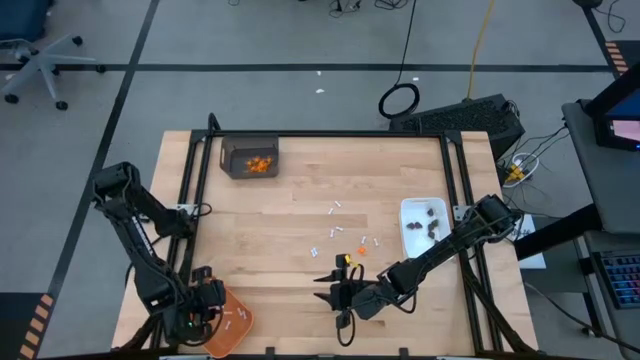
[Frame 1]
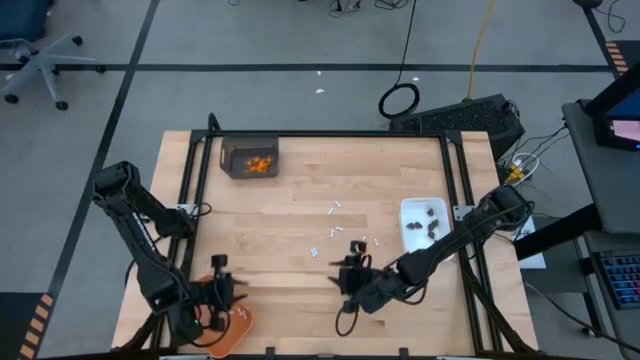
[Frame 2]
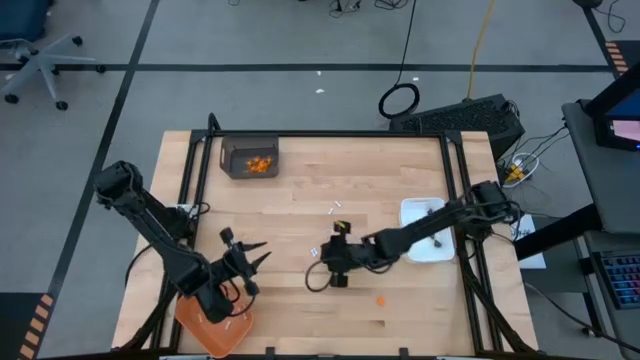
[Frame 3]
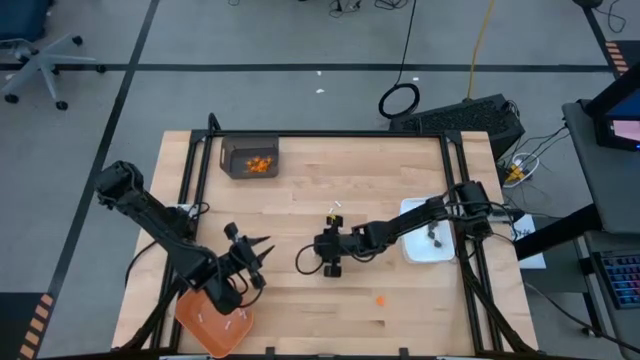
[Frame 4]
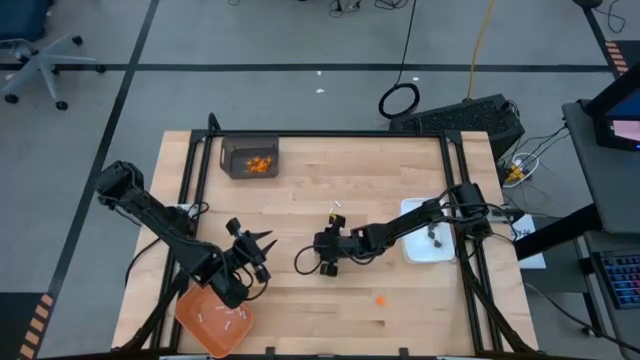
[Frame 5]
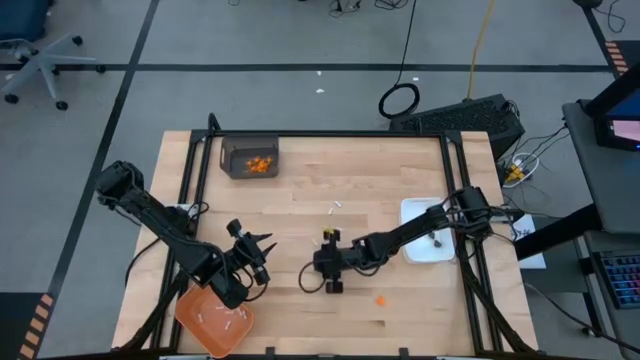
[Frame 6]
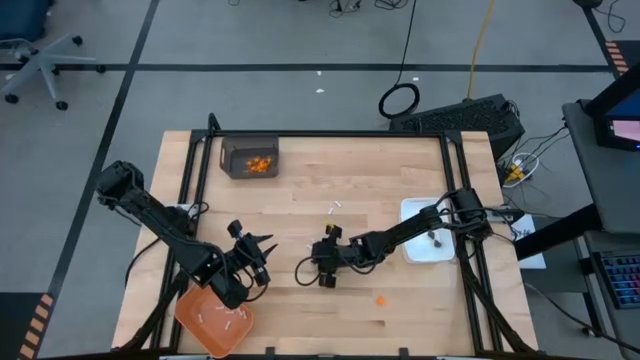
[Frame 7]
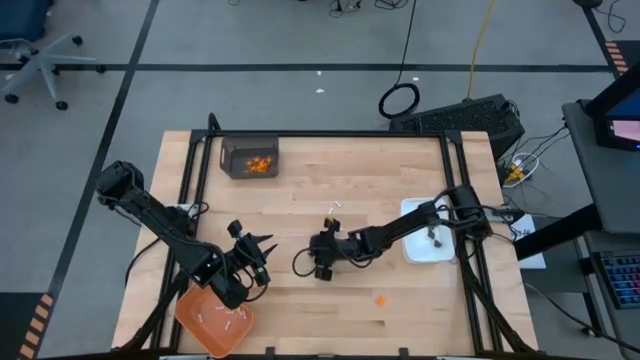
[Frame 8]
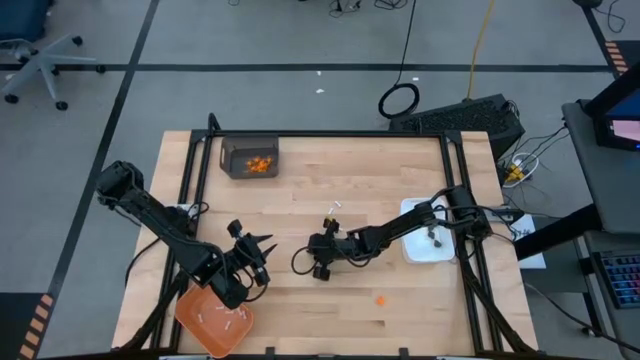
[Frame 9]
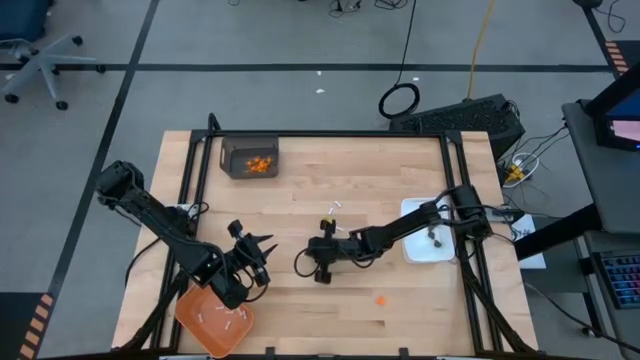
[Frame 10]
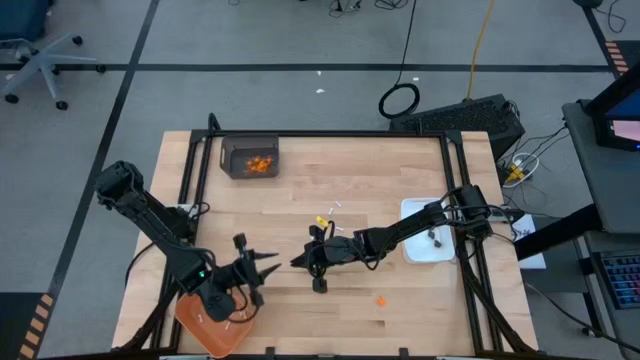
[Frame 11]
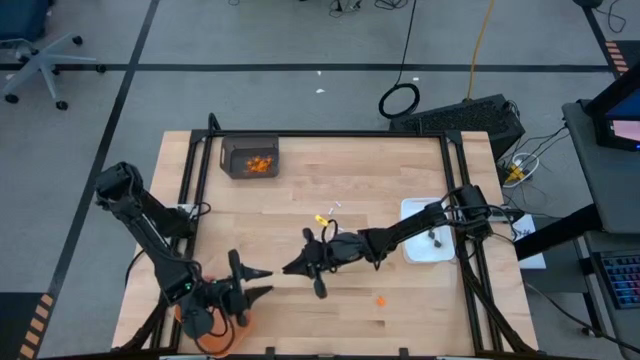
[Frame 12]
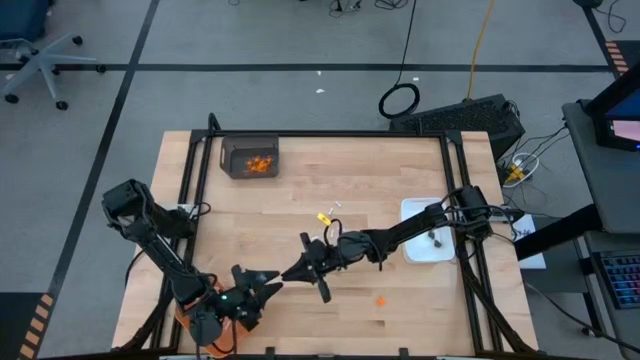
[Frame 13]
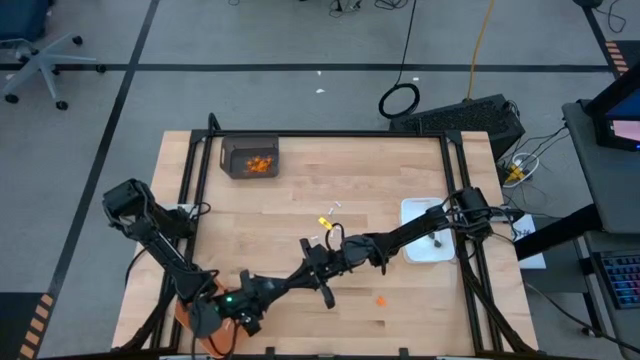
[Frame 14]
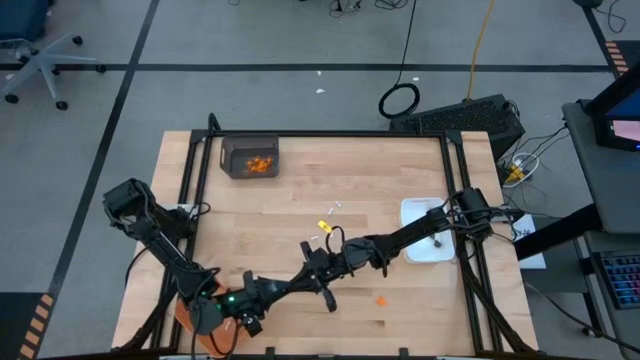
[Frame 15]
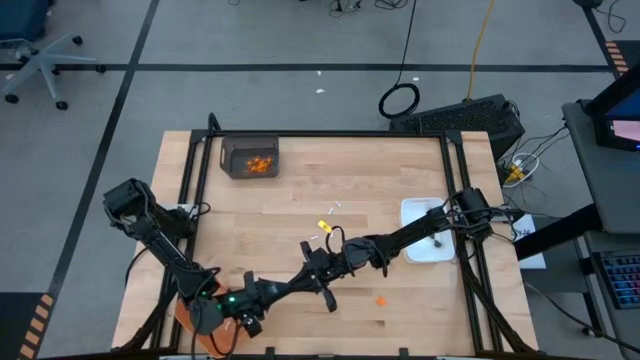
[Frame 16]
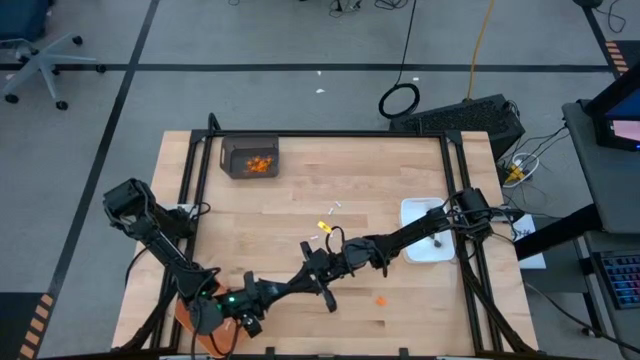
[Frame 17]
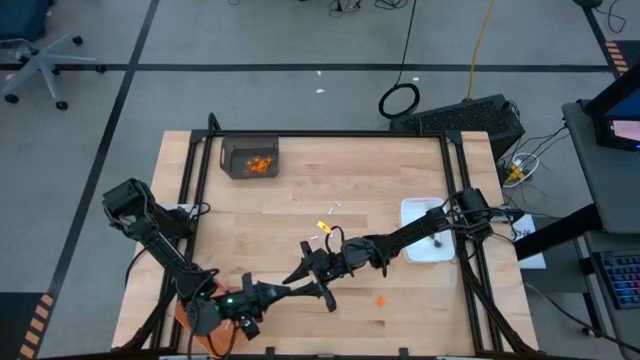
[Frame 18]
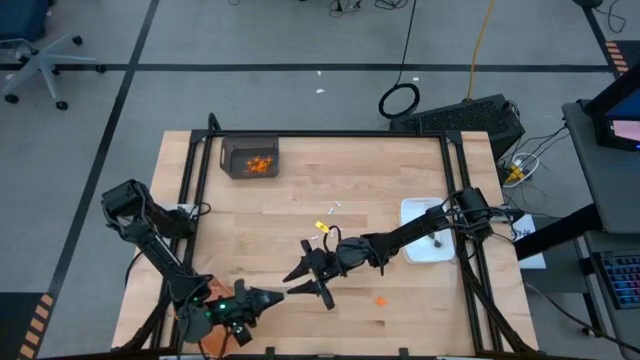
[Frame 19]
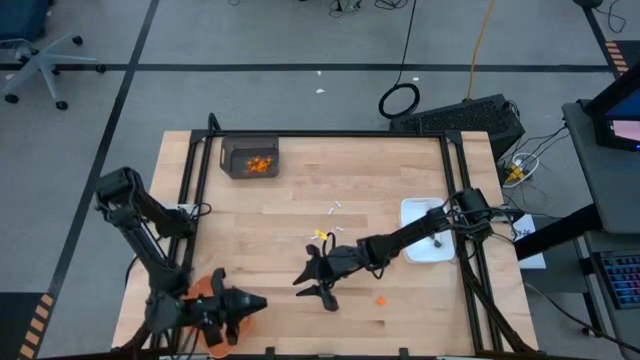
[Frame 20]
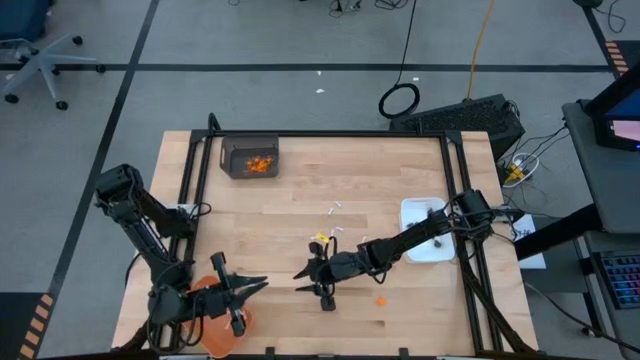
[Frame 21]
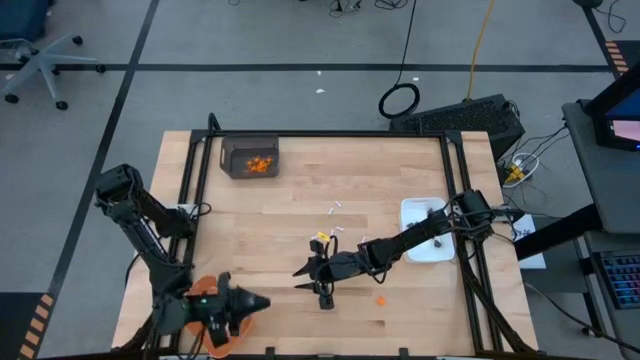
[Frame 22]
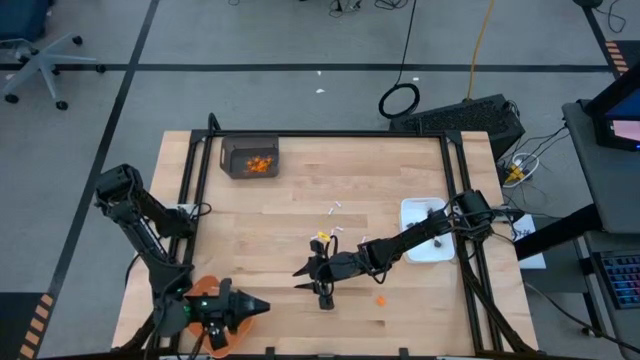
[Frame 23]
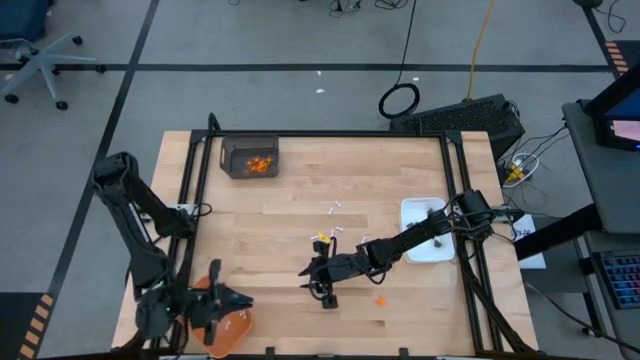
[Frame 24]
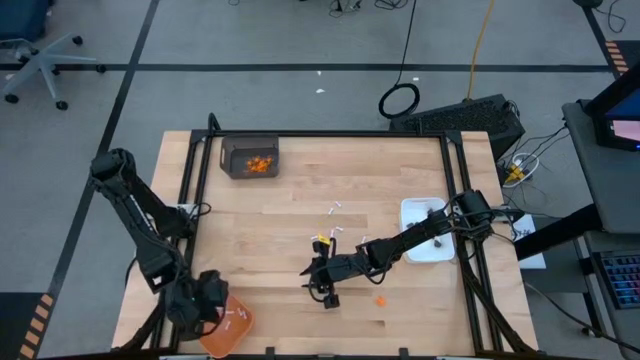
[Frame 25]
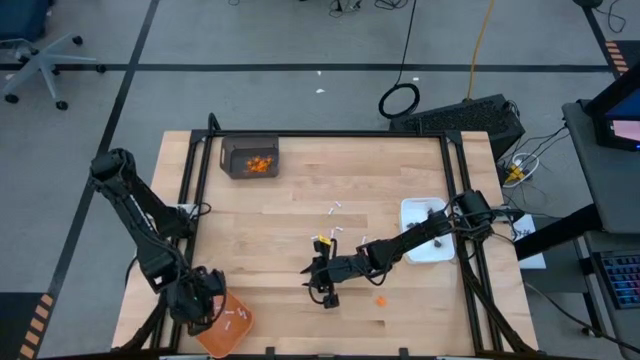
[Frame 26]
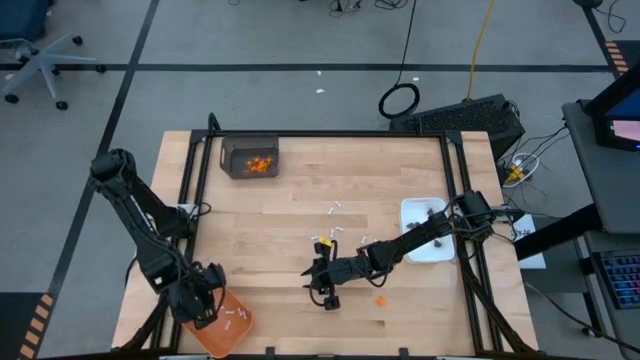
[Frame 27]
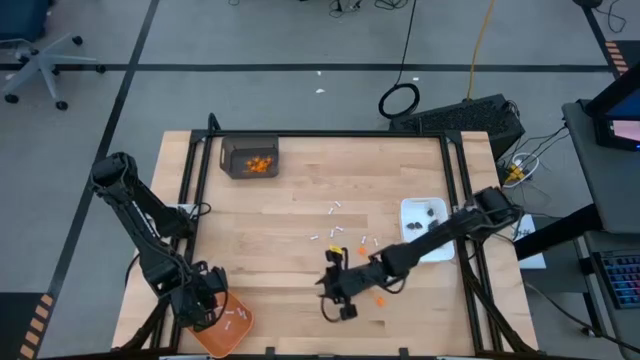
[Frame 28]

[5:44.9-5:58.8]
Task: Sort Halloween decoration
Put the white bone toy into the orange bin

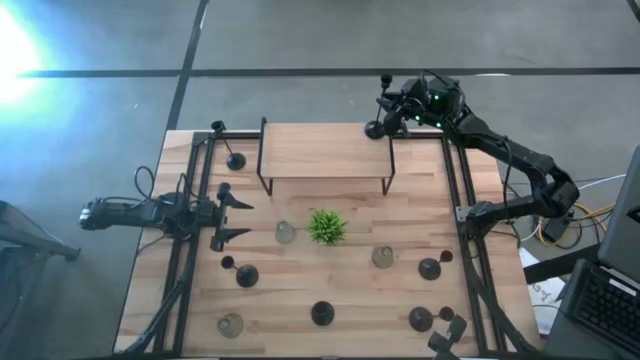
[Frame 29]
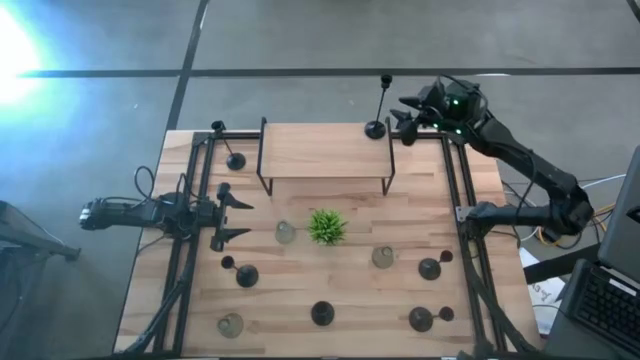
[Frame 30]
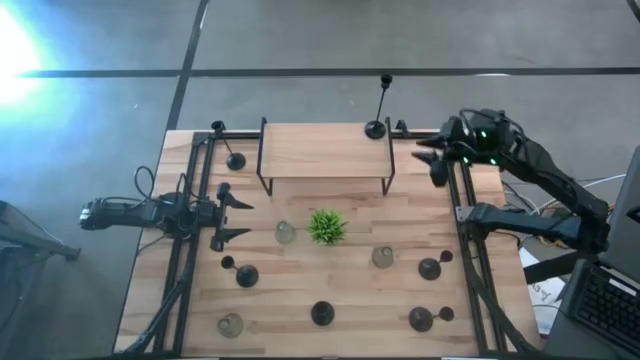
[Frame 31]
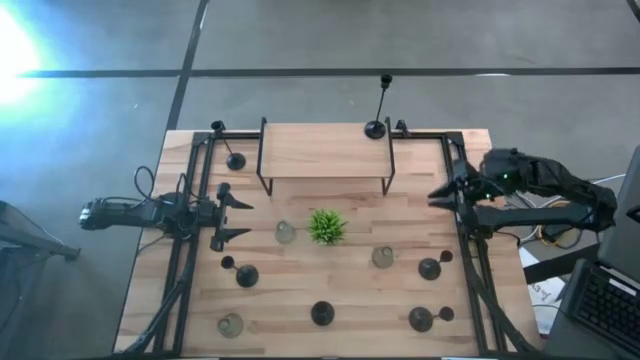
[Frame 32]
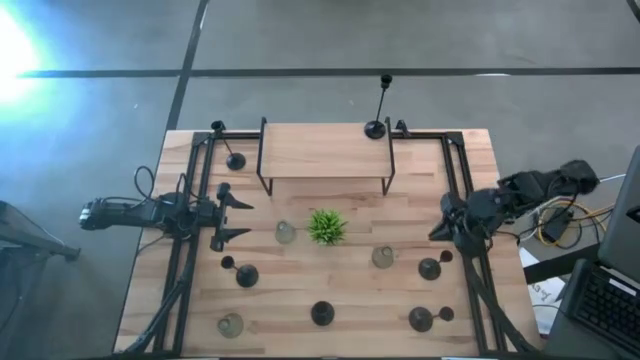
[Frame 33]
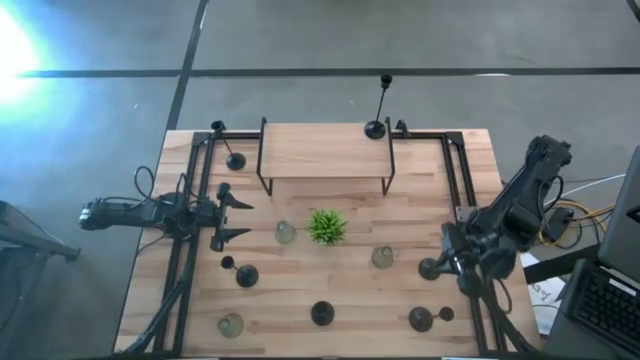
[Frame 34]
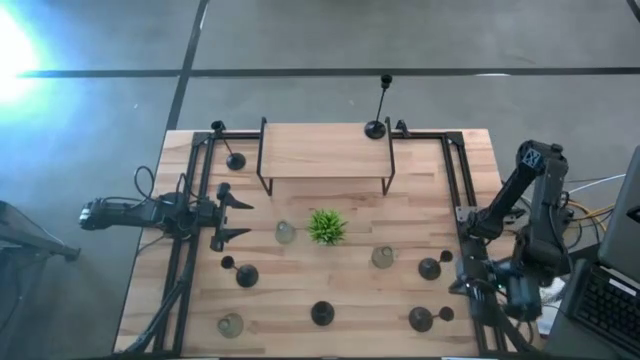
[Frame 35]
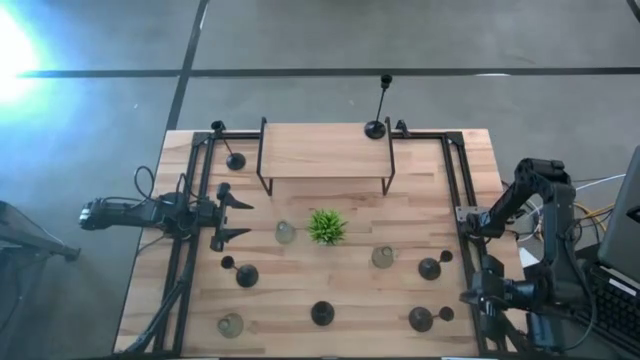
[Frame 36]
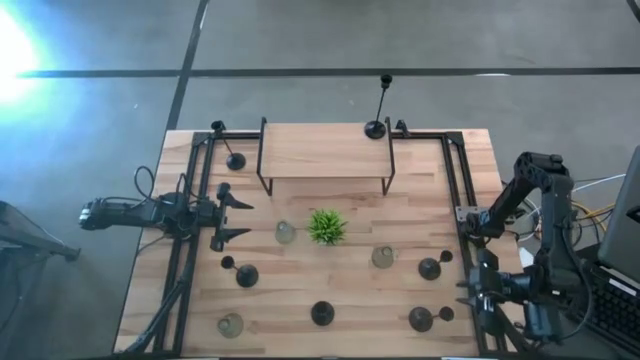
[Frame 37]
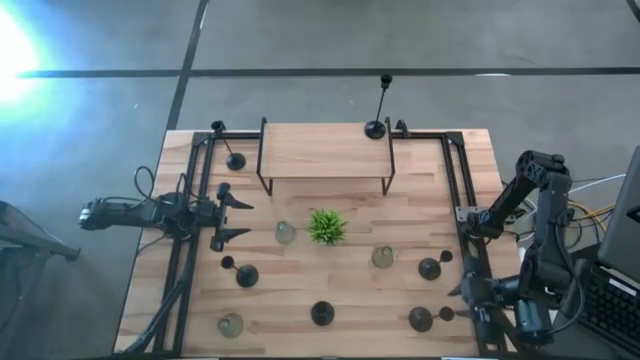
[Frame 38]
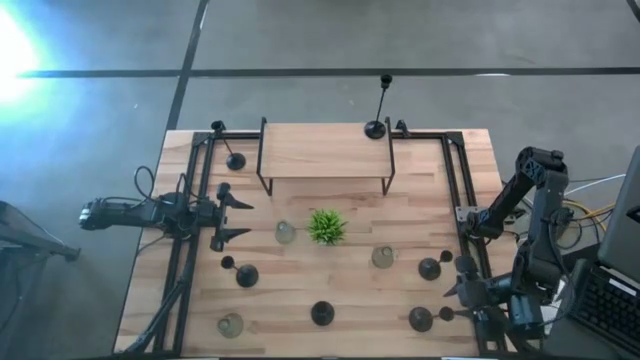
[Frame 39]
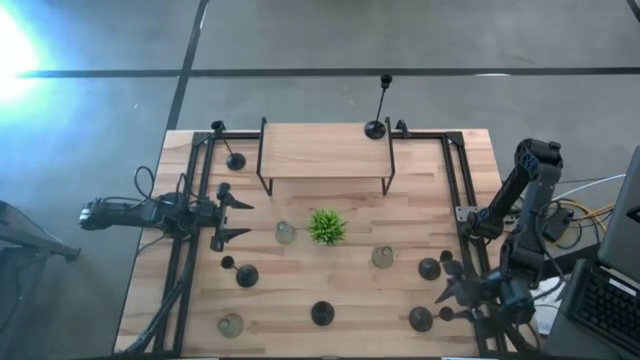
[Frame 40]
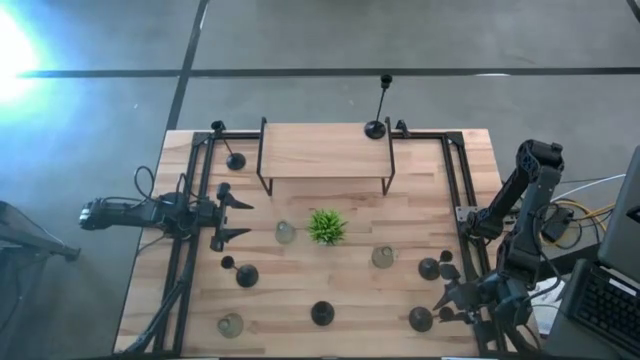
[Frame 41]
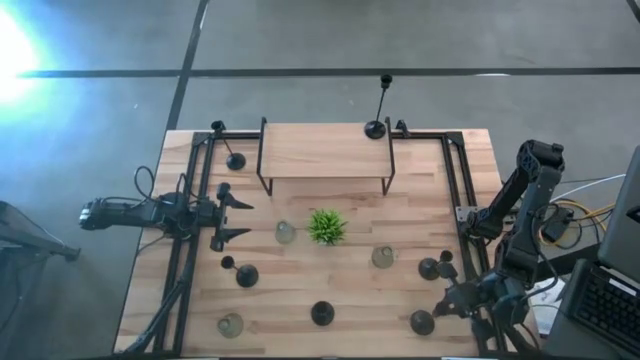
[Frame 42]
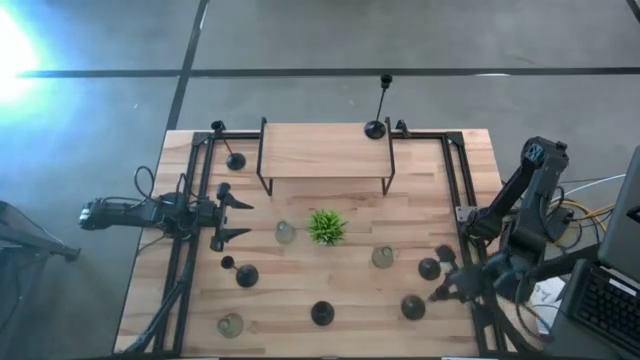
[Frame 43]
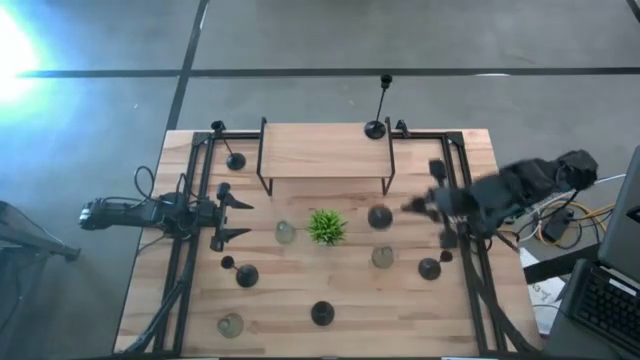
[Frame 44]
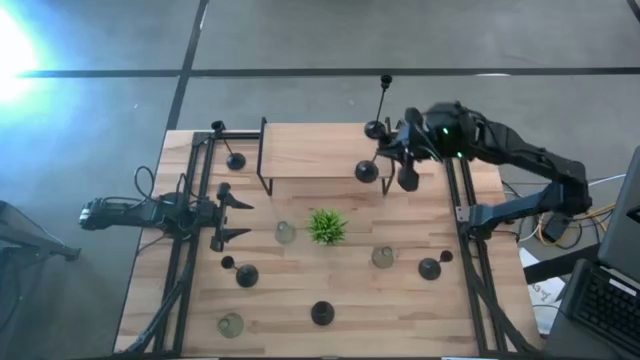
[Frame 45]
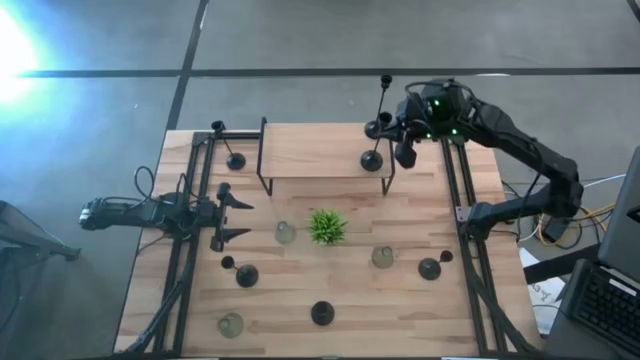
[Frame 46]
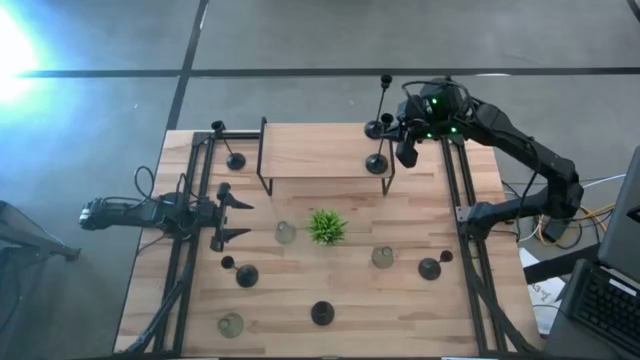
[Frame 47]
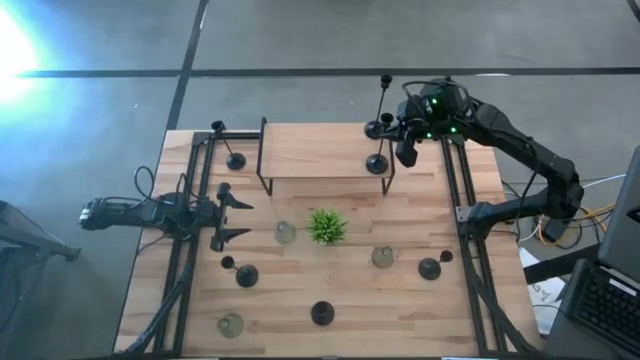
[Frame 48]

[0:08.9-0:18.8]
Task: Pick & Place candle stick holders
Align the black candlestick holder with the black candlestick holder on the shelf
